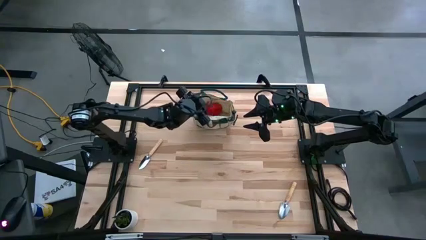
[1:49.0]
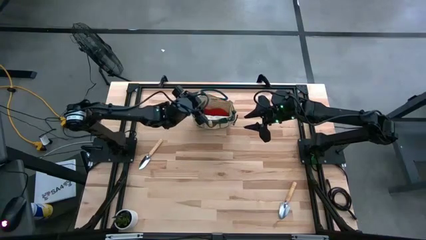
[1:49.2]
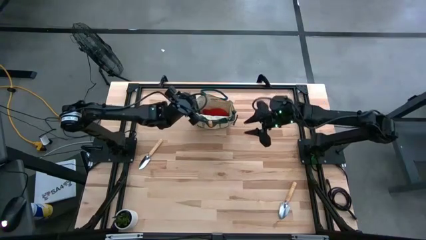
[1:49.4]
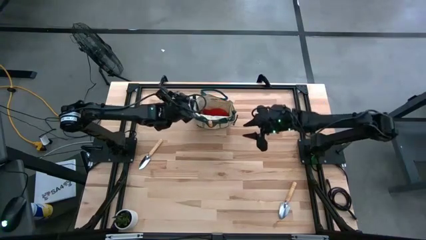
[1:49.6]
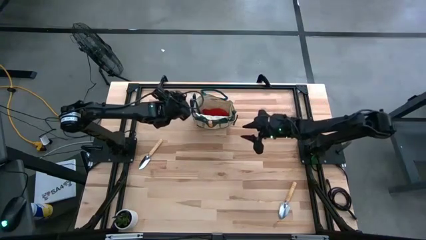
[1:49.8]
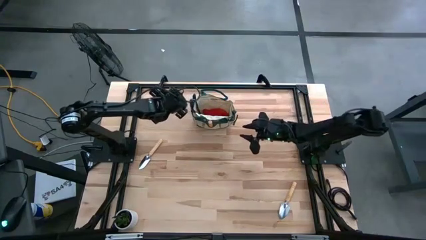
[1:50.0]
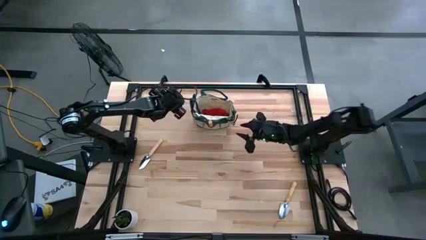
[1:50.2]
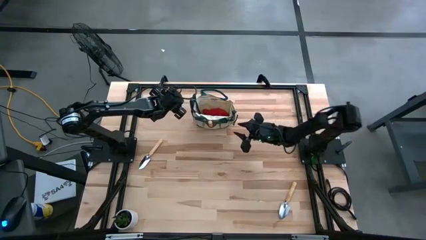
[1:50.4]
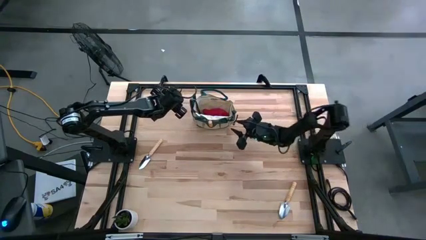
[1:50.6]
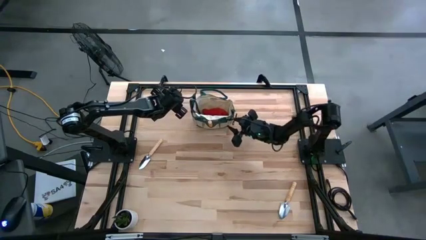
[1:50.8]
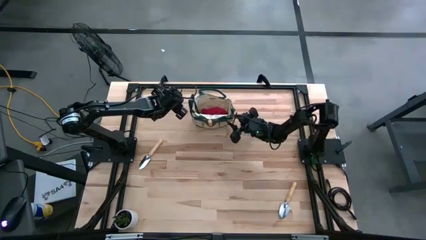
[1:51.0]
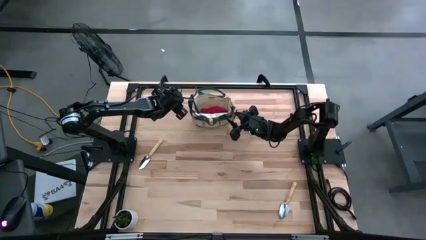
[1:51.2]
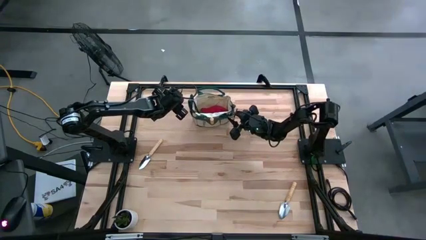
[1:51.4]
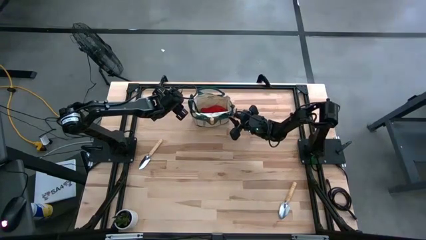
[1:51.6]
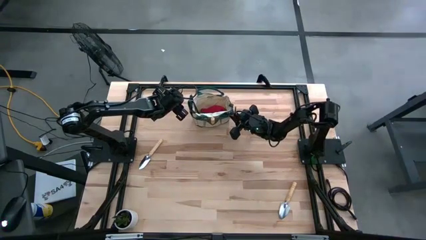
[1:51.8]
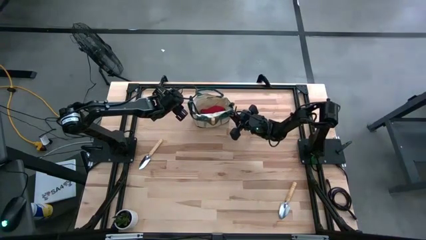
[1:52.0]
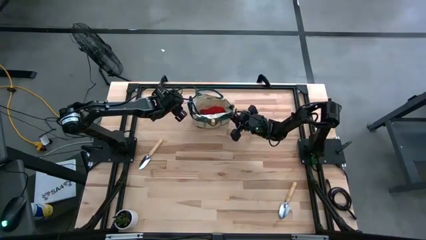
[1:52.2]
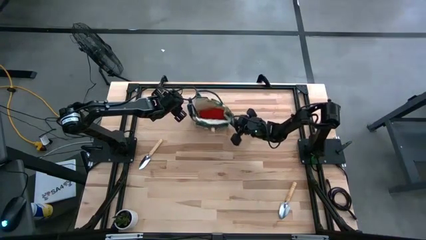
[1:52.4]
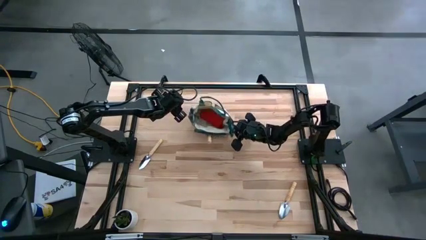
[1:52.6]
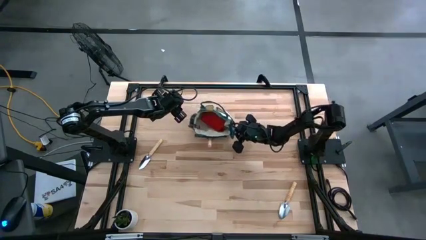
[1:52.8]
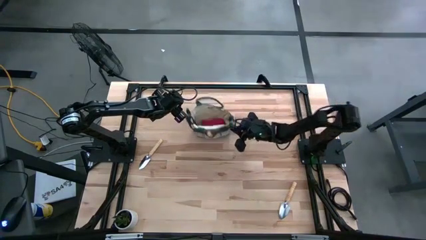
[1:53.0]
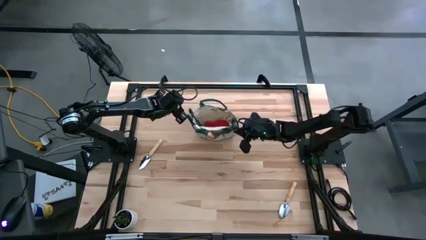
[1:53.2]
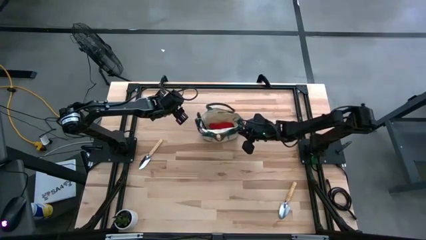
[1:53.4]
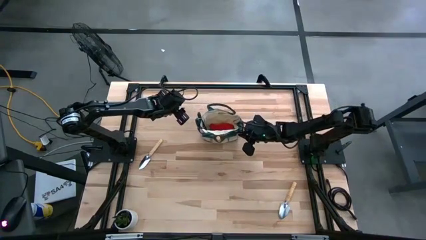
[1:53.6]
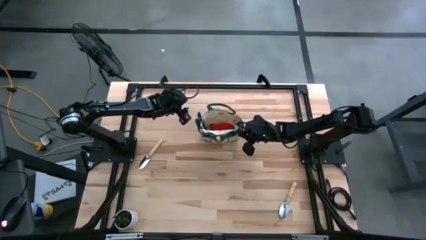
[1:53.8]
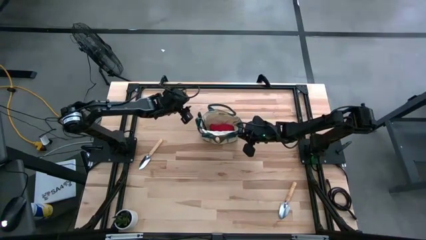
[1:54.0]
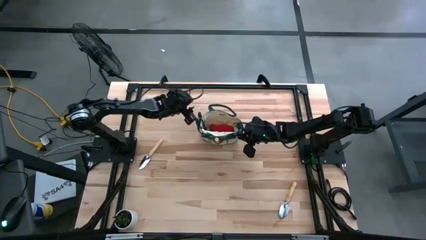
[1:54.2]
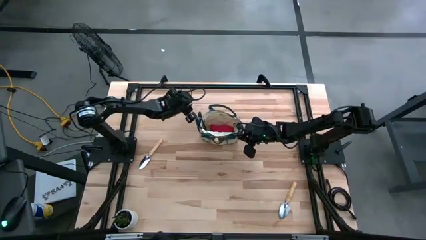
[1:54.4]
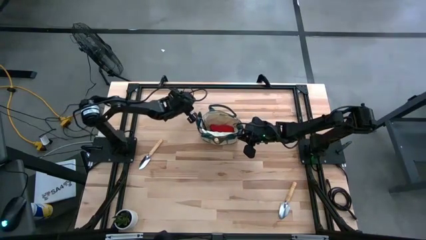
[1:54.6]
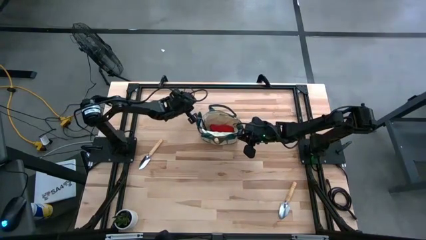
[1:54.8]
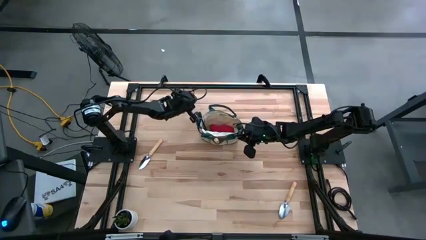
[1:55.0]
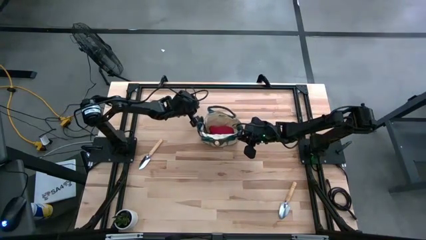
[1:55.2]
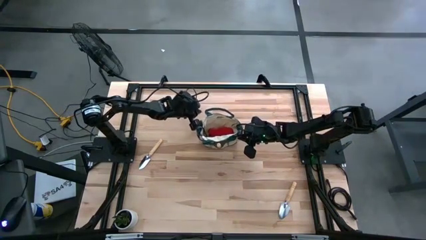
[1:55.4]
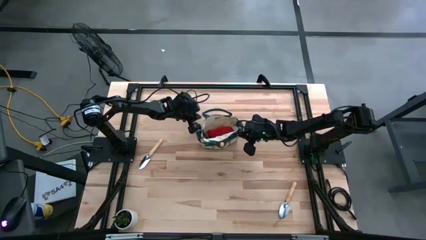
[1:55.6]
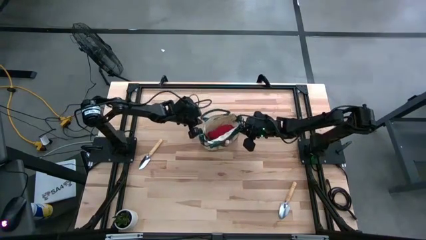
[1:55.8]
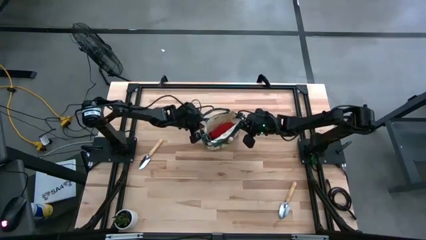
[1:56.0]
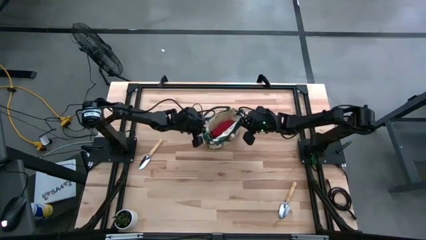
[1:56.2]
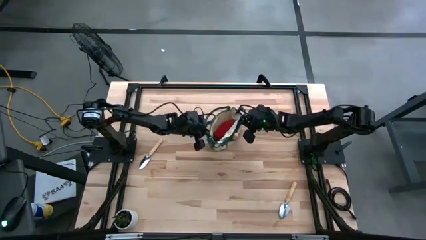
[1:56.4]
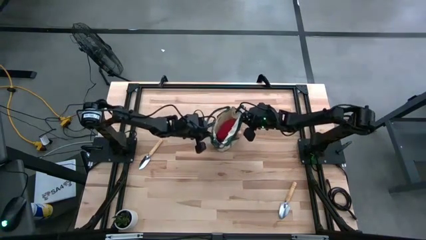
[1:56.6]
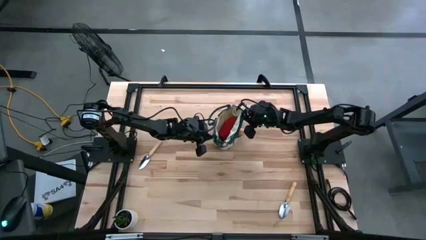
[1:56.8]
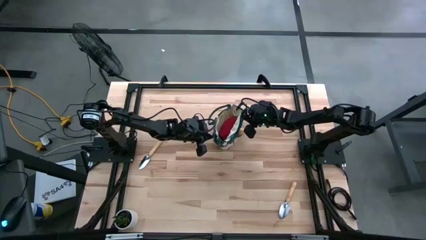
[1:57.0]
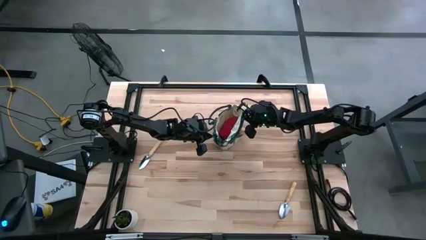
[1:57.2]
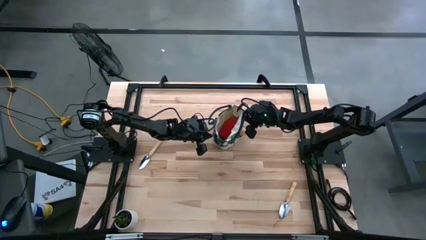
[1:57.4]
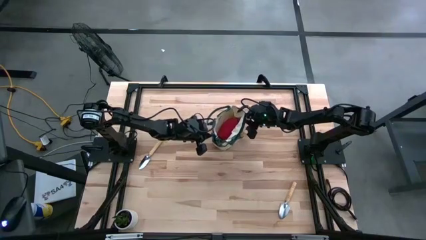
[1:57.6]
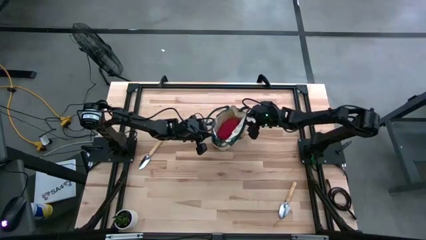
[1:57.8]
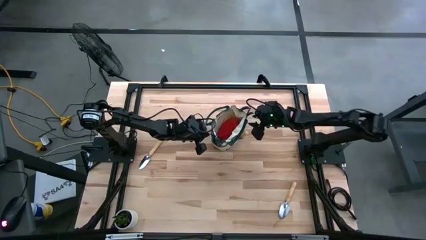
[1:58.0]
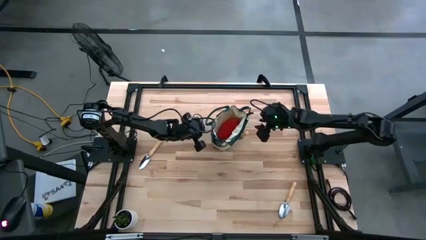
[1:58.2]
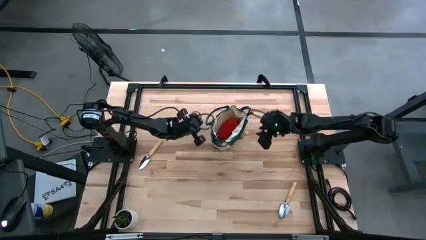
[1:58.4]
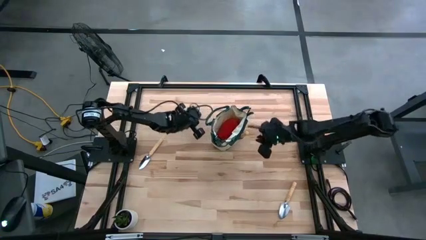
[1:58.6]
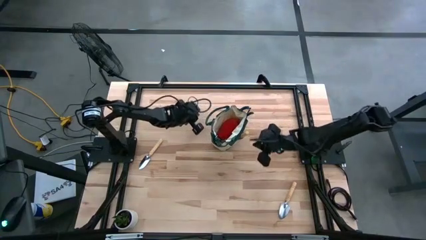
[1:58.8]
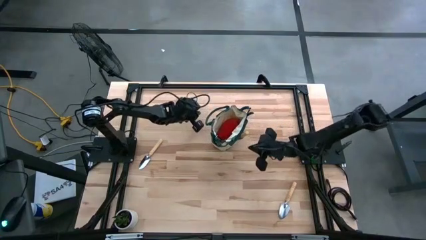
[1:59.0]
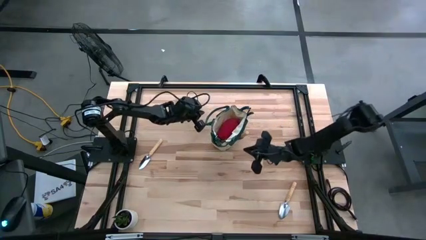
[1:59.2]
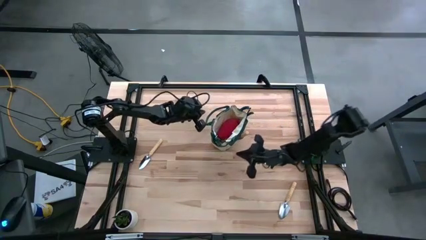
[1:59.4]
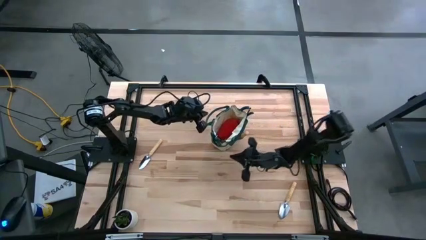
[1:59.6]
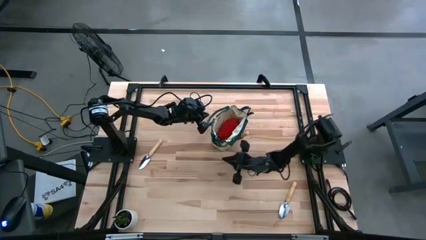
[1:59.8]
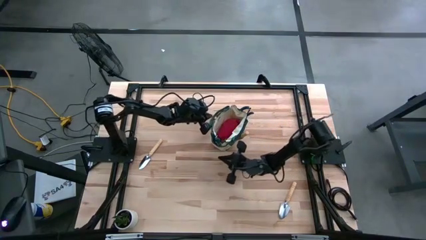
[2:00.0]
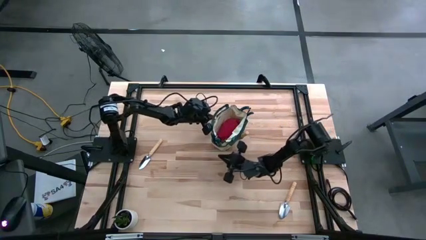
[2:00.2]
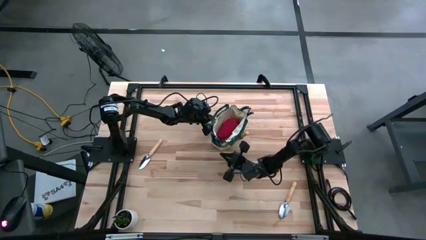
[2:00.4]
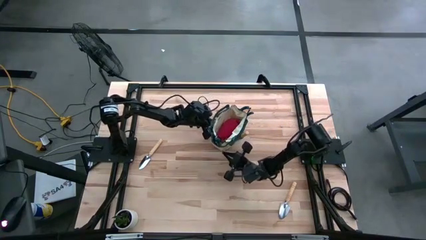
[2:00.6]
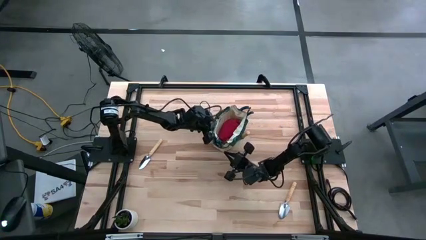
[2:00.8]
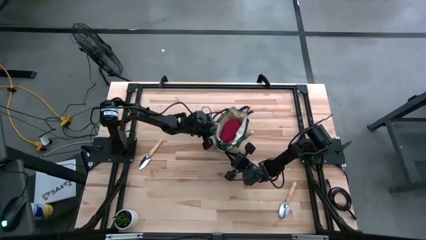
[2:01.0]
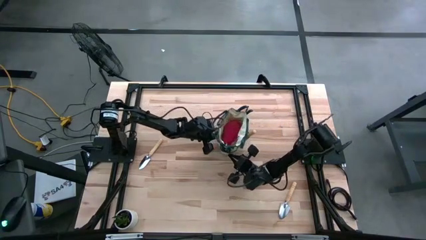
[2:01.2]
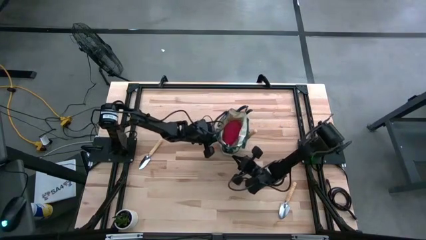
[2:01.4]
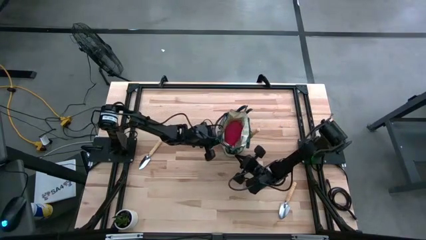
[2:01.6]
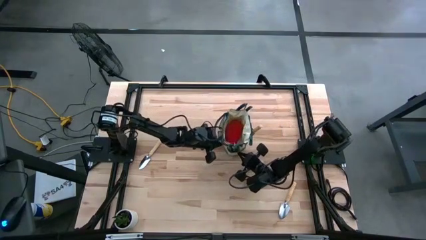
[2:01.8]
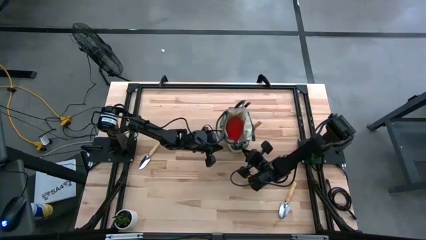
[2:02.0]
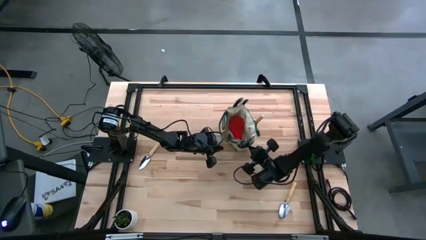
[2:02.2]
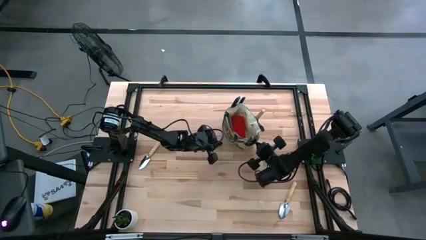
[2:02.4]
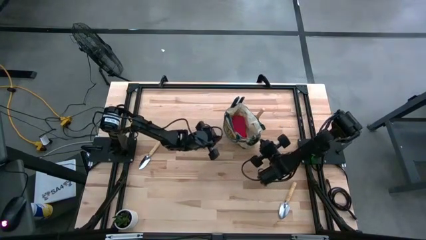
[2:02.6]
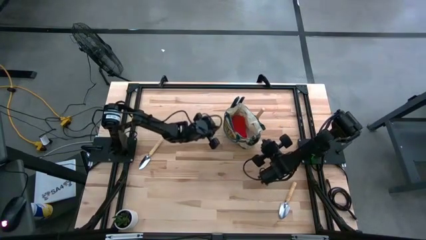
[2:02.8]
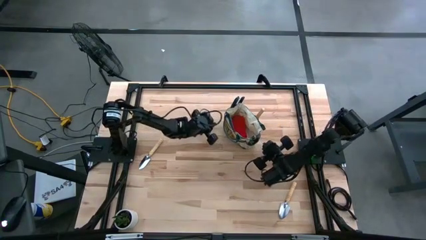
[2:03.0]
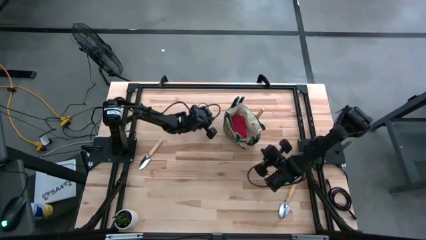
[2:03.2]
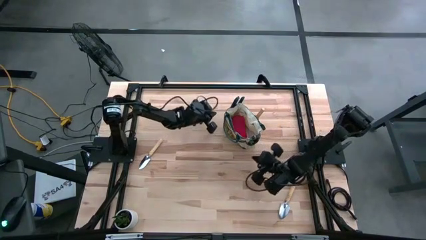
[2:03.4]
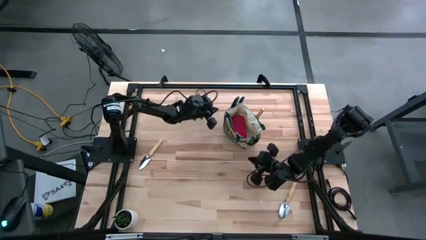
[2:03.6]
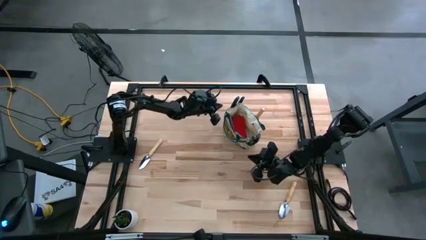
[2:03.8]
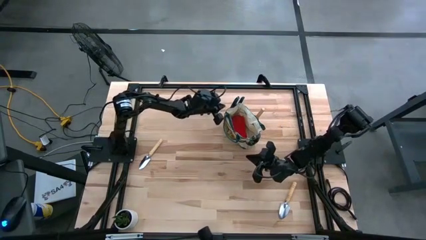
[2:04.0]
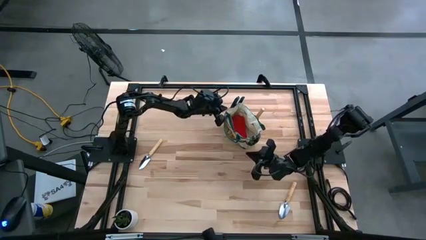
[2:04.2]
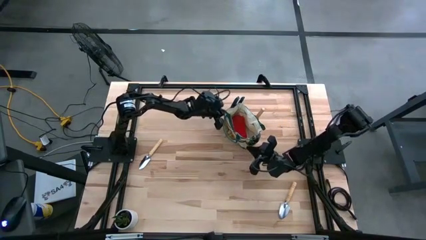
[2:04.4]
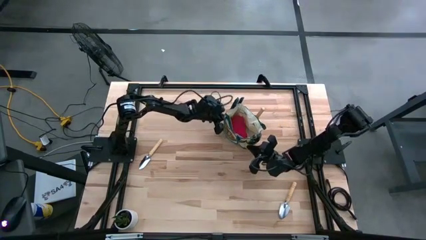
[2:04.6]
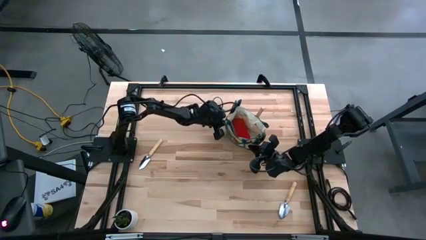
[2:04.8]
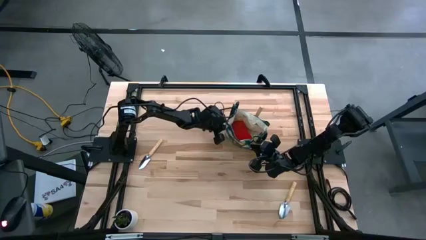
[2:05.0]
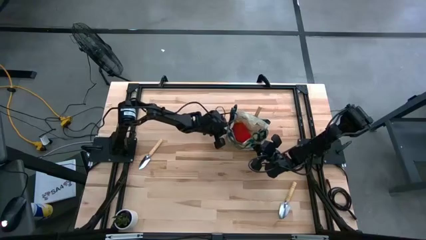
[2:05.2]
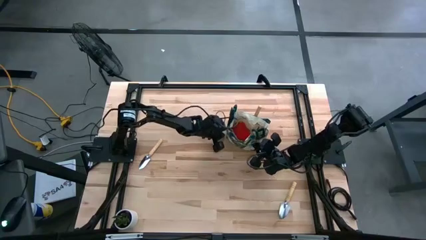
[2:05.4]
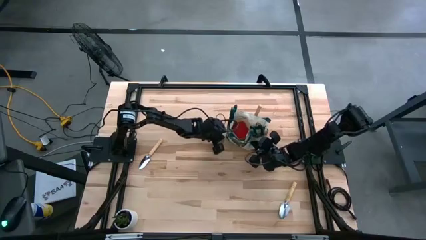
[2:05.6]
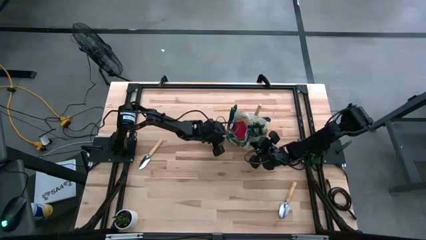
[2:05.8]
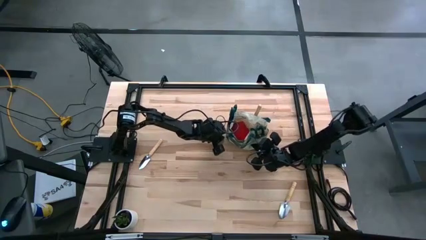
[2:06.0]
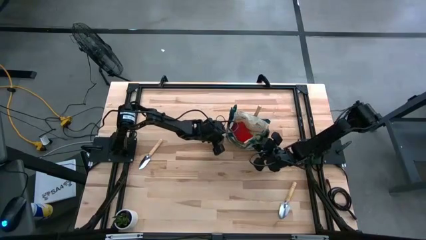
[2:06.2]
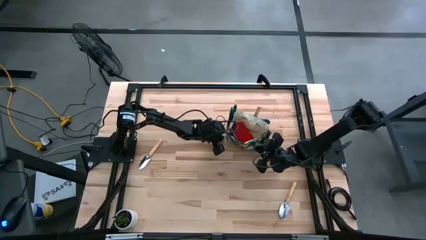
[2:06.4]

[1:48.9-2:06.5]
Task: Pick & Place Garden tools in Gardening bag
Adjust the gardening bag on the table
